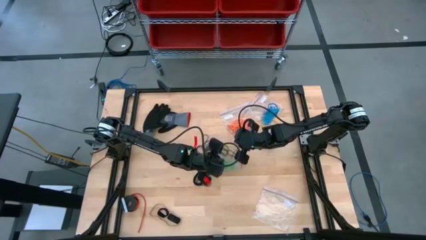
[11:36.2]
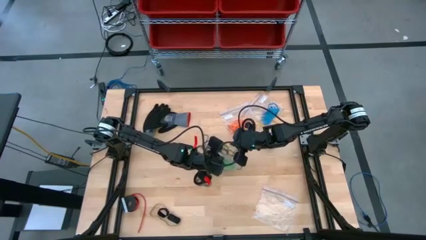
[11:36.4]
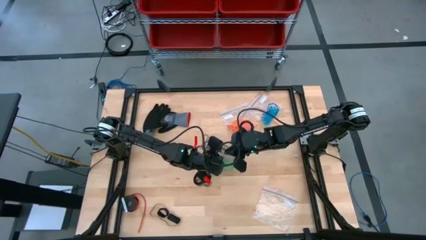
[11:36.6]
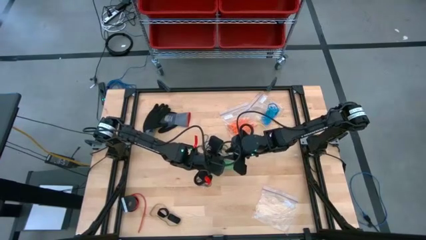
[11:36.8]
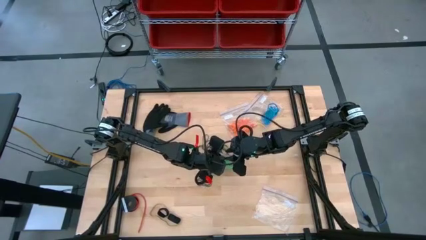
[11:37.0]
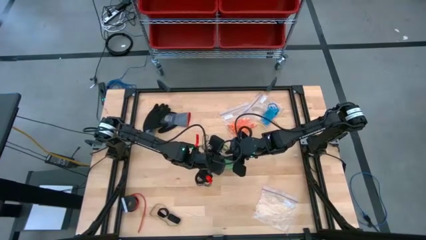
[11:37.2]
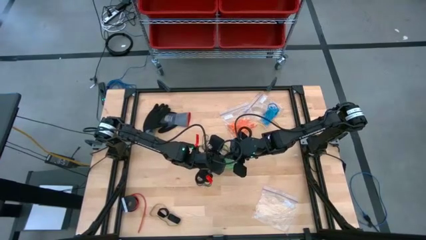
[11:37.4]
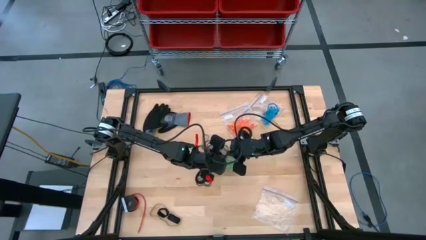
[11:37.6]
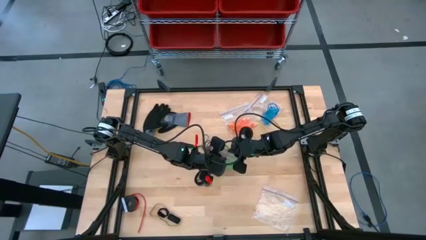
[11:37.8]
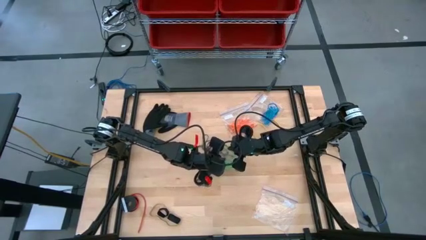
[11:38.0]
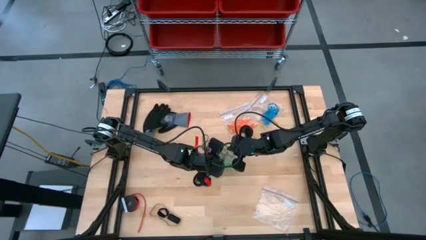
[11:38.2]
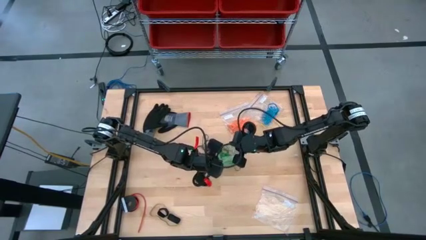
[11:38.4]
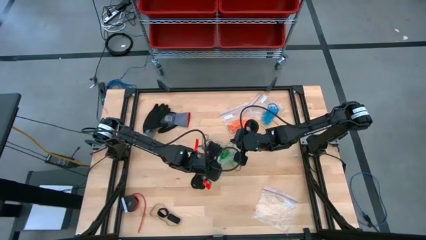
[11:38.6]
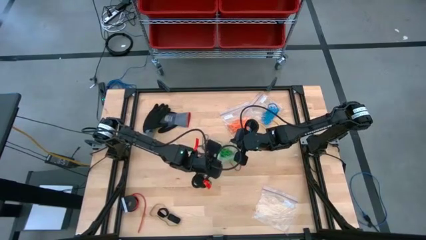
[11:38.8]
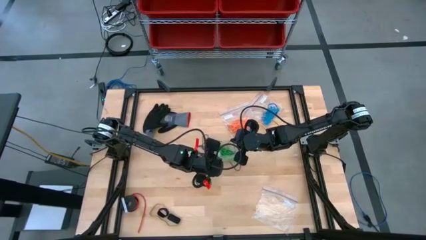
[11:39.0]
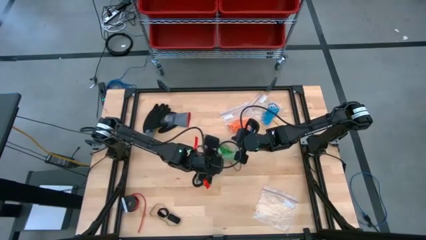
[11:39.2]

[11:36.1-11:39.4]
Task: Sort rubber bands
Open the transparent zip bag

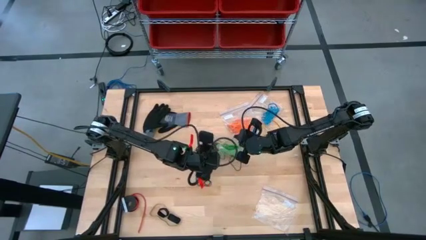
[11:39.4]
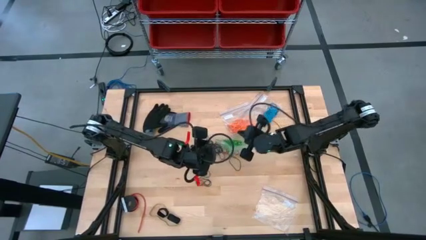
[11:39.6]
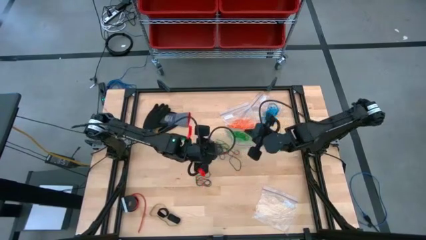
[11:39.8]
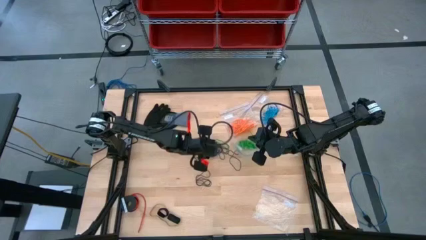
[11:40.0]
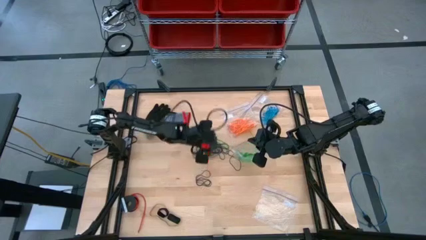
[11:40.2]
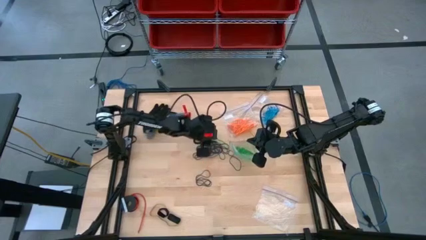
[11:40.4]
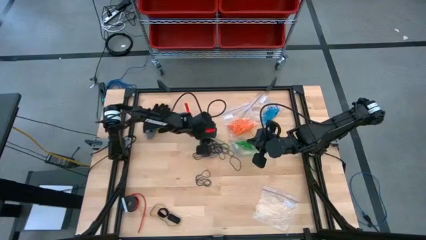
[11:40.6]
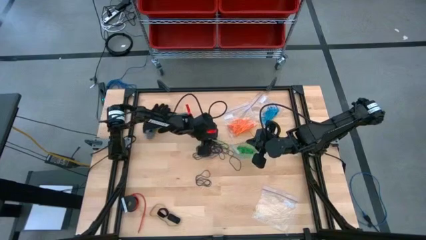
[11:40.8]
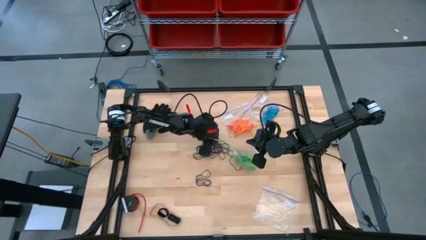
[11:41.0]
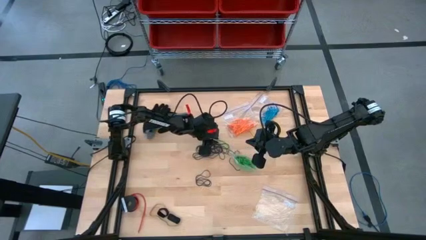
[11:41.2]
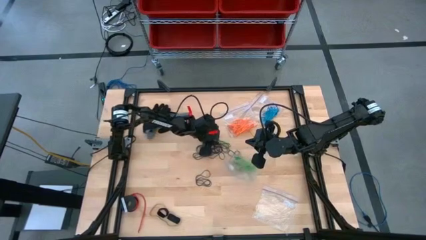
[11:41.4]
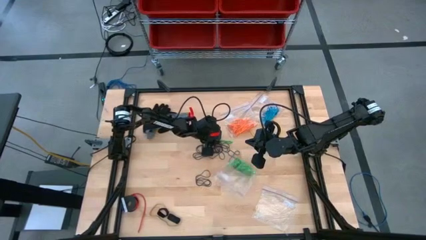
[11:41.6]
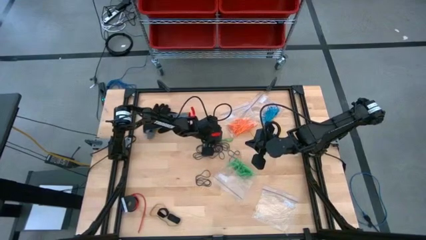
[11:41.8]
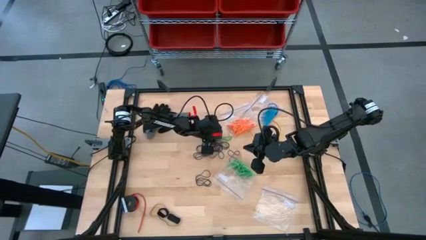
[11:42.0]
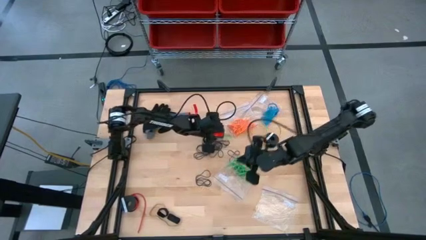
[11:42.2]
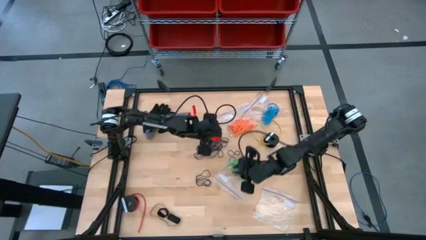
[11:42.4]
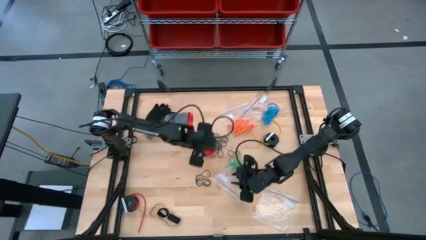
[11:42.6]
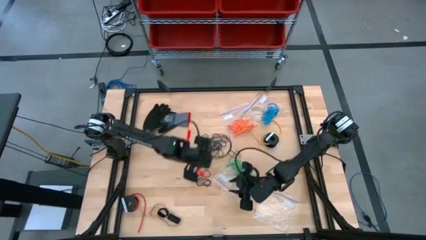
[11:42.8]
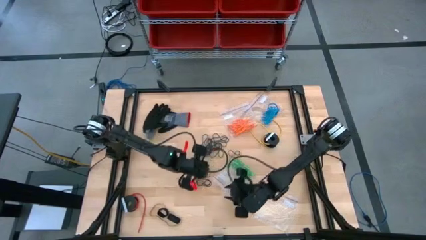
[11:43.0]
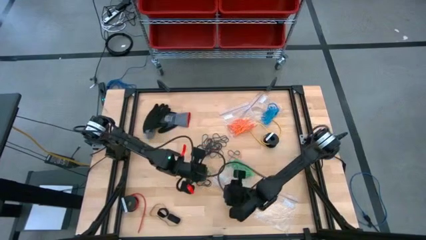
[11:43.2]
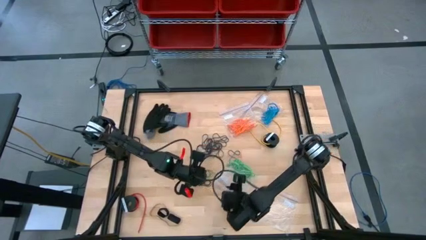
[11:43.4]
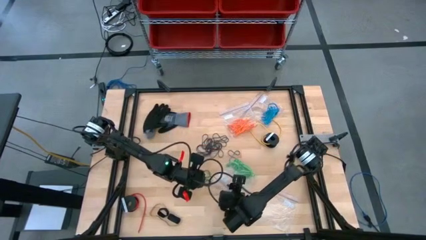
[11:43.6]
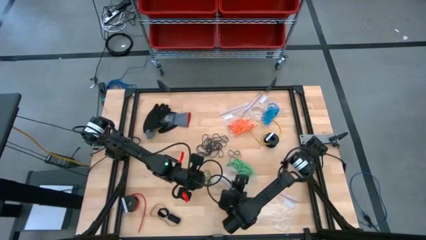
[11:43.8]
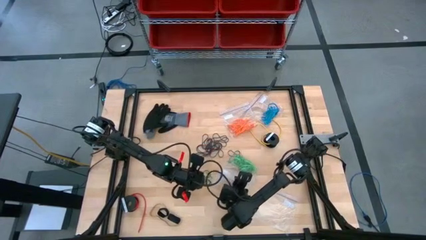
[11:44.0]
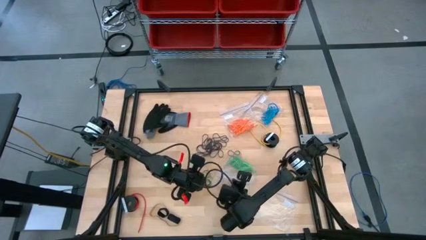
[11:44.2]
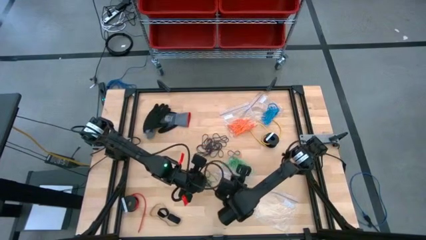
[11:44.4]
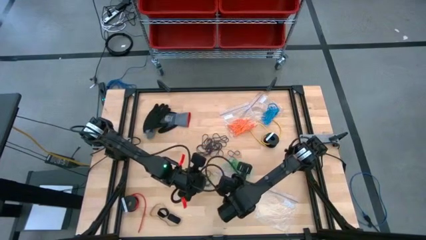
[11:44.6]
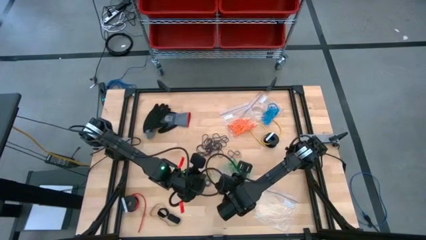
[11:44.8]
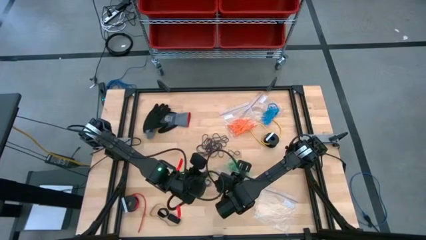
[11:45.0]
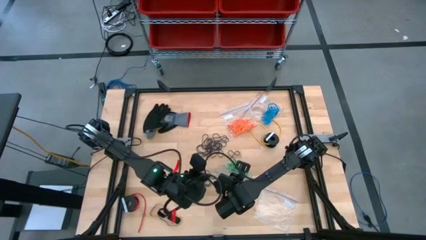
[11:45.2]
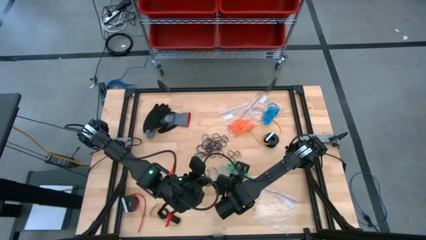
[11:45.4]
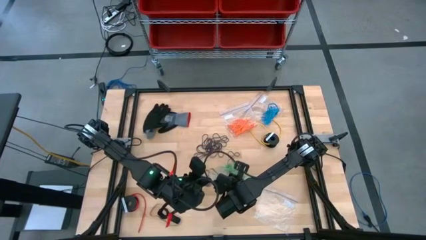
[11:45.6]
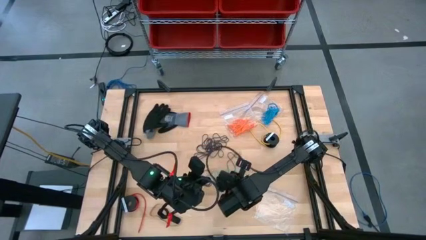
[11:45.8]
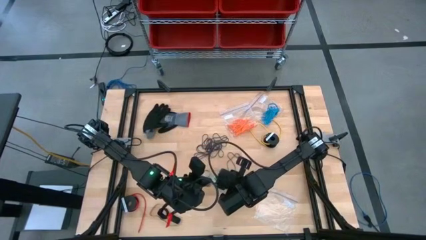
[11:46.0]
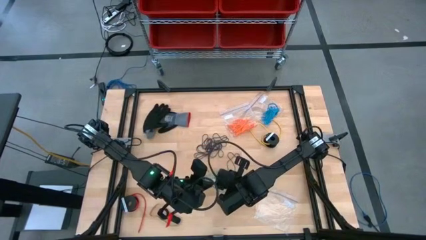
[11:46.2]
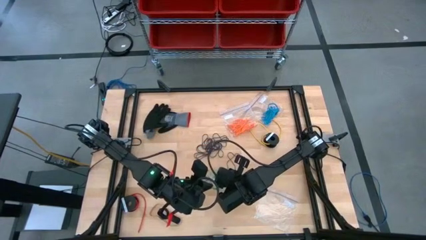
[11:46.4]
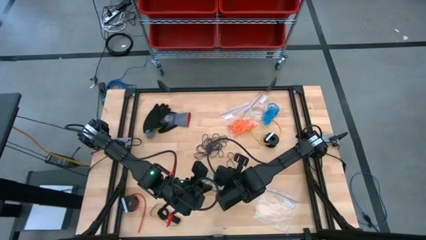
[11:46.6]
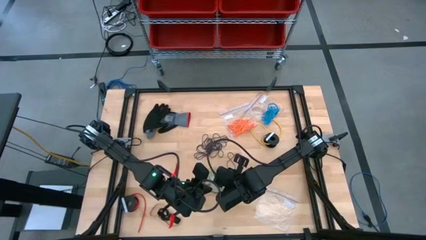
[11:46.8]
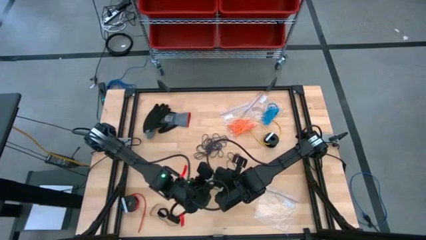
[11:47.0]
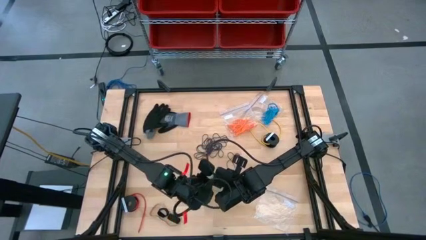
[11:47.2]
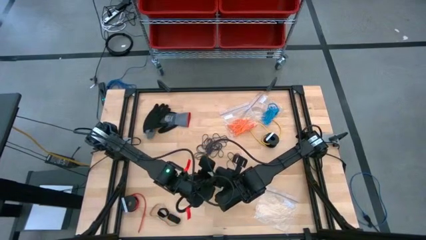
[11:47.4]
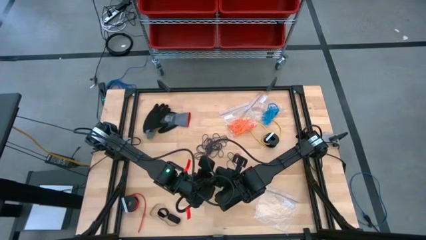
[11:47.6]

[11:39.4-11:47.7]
Put the green rubber band into the transparent zip bag
